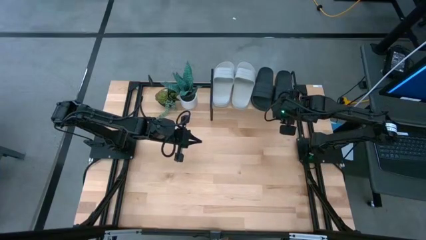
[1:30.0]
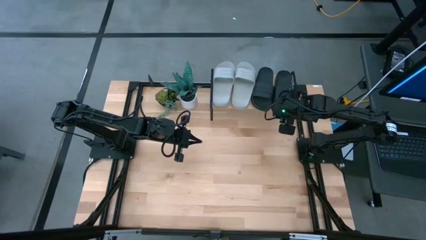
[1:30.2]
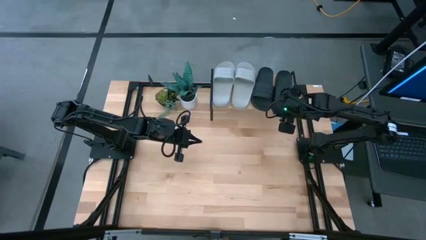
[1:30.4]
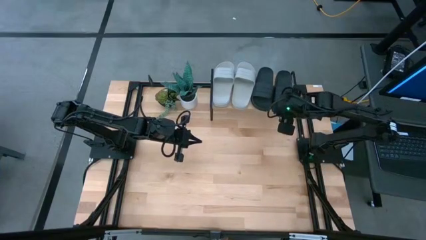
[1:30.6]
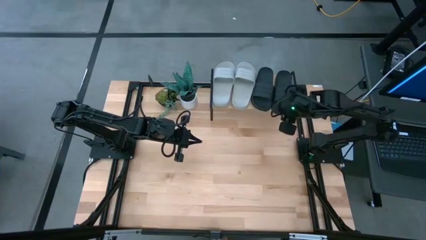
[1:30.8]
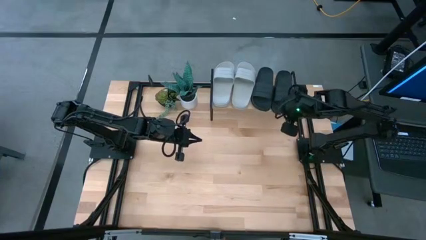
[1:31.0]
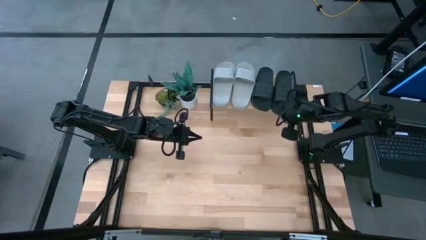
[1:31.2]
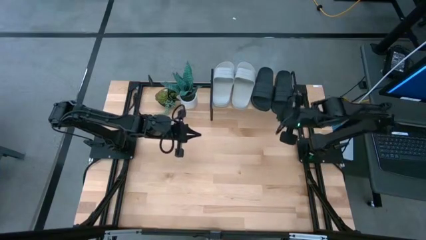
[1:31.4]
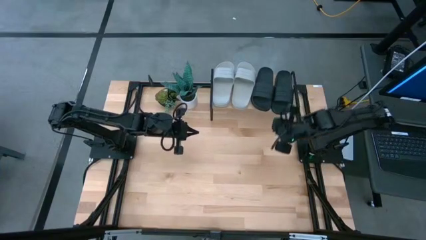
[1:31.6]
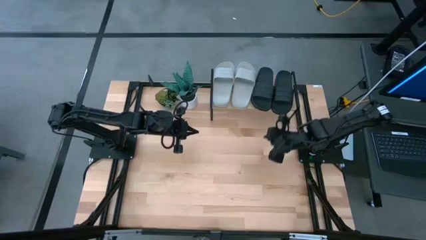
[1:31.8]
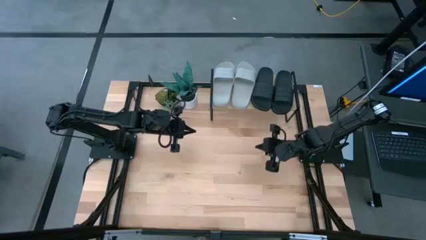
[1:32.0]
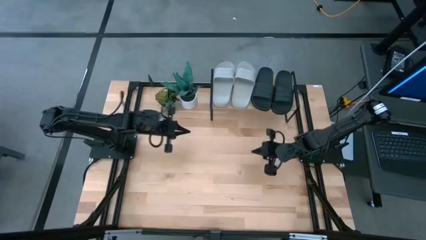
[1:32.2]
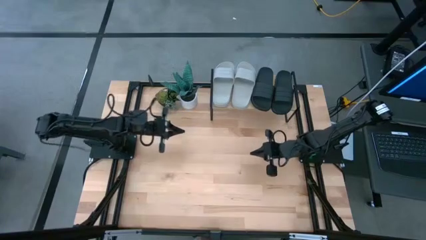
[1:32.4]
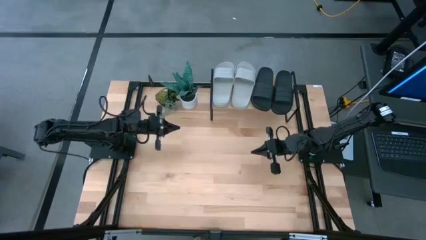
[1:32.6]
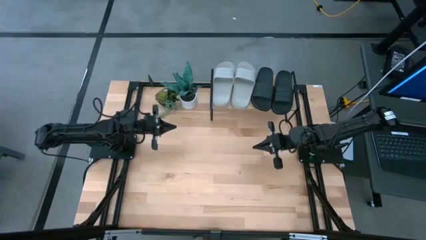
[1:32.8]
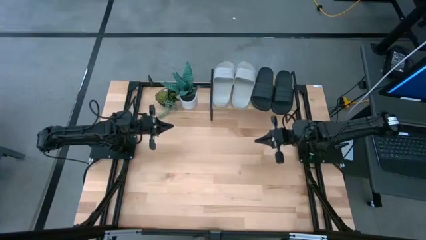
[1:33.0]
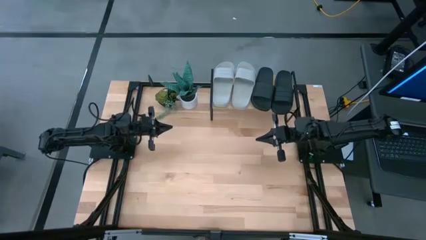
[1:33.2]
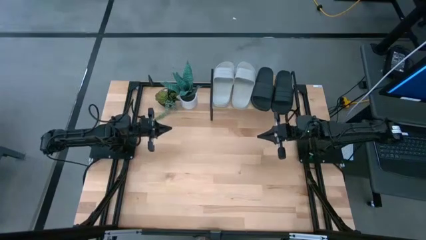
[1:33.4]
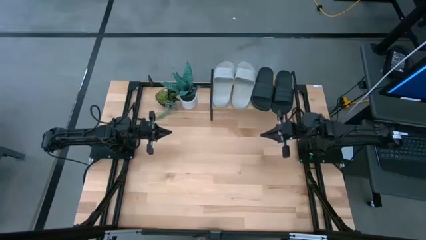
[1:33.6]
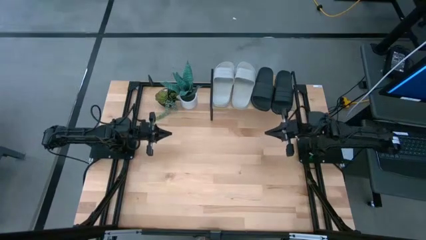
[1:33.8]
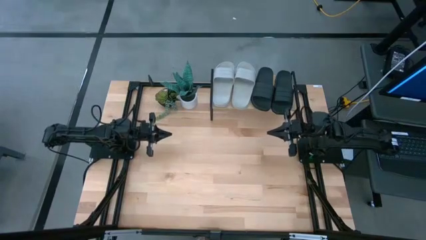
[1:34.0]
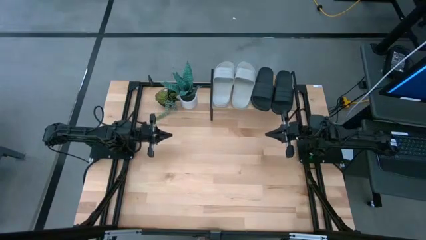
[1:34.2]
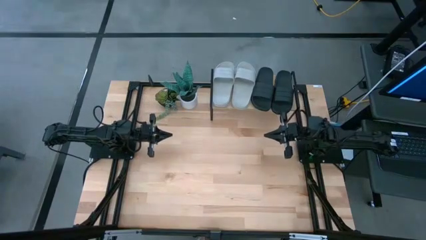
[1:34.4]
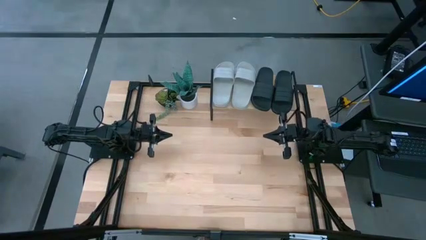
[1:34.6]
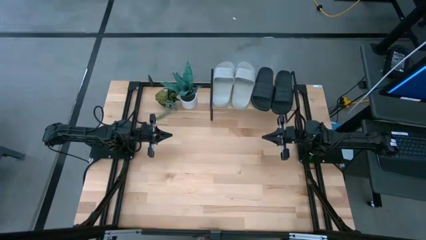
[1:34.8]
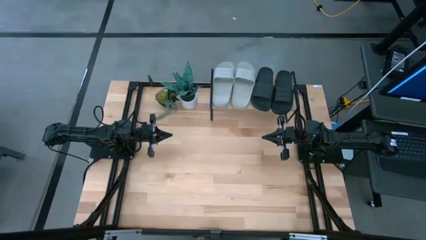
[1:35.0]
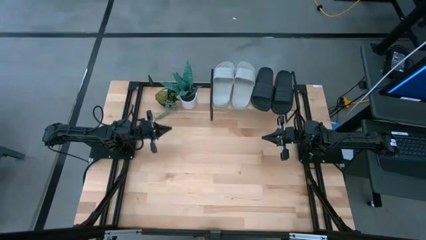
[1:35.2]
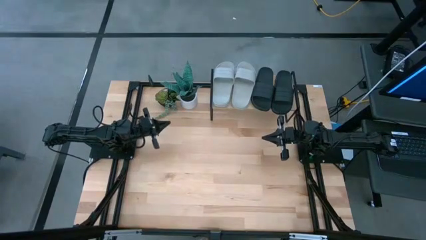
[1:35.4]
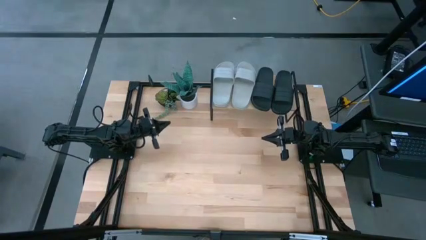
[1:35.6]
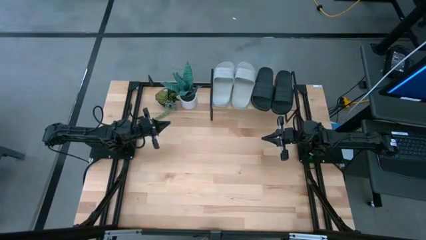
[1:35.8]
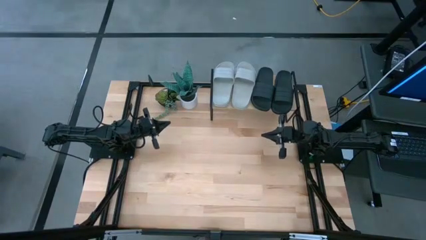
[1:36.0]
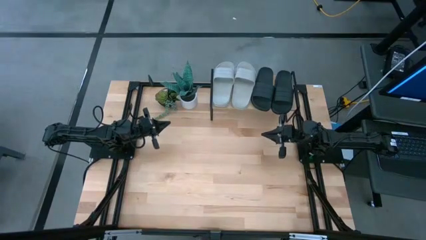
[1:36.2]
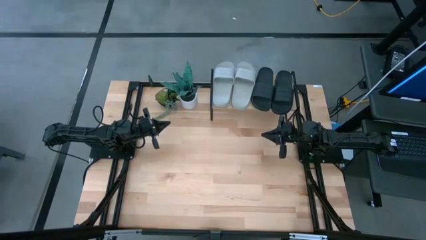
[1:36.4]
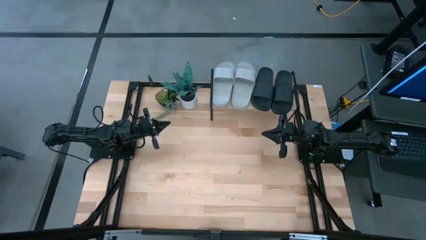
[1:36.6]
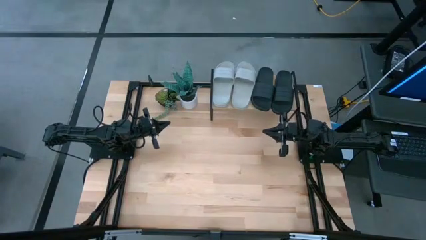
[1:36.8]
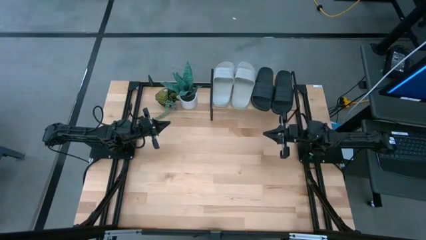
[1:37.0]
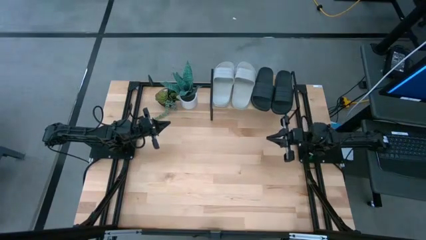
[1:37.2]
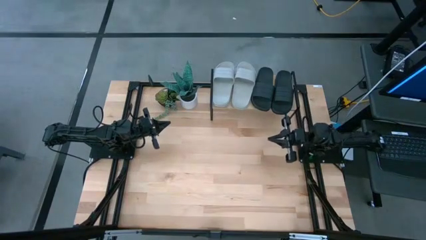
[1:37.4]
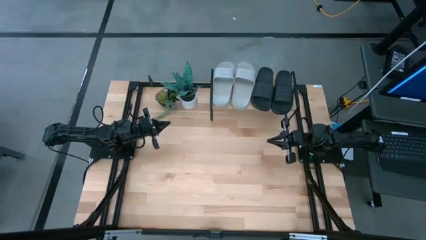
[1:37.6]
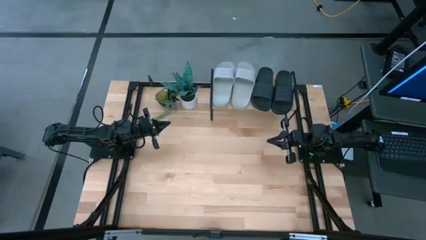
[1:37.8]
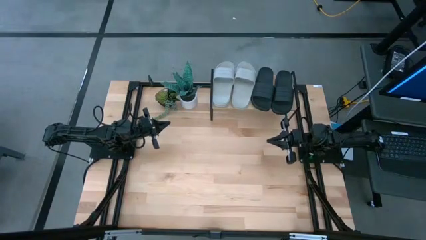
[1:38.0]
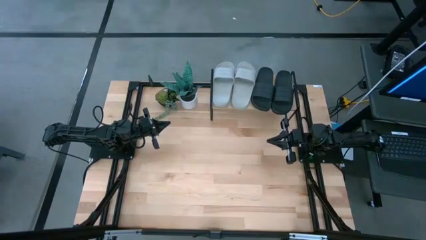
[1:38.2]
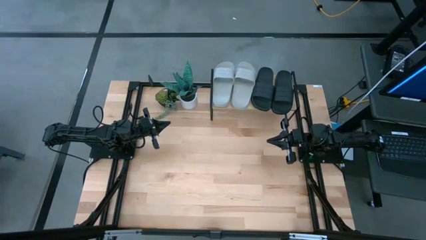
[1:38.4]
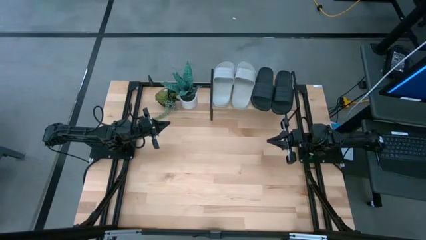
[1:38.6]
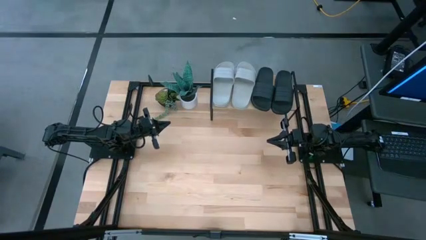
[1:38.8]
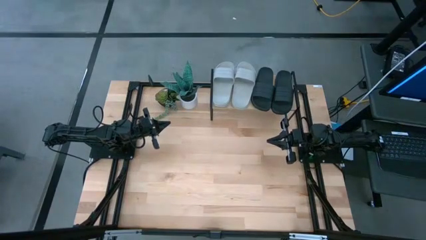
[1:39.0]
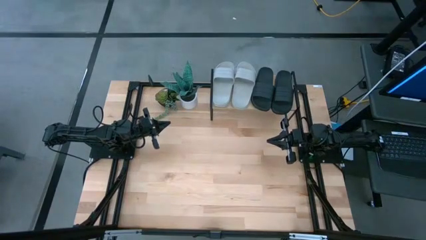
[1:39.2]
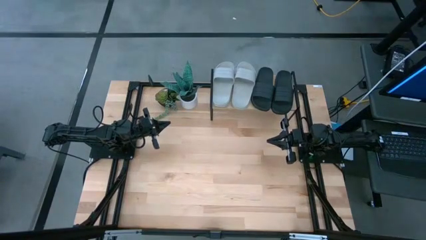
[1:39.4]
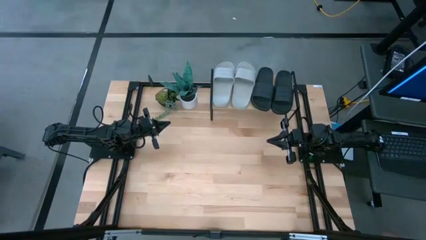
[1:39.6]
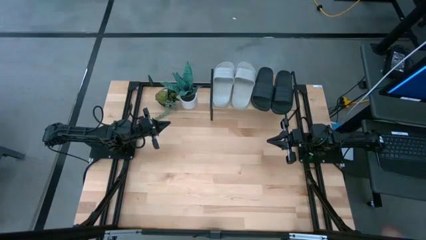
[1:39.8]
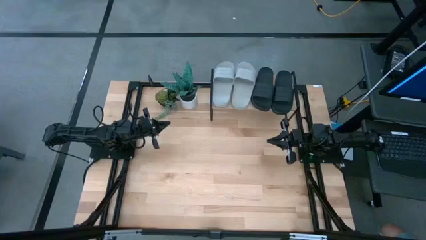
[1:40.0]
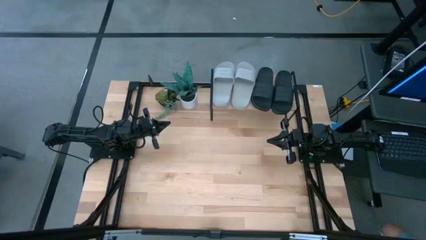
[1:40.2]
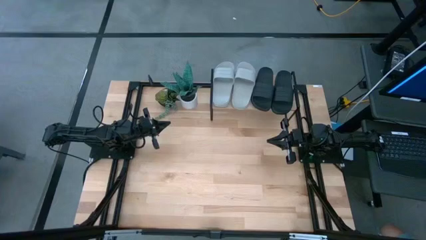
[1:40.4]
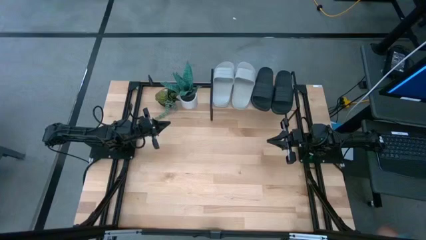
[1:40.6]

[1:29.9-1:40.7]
Task: Pick and place slides into the shelf
Return to Home Position

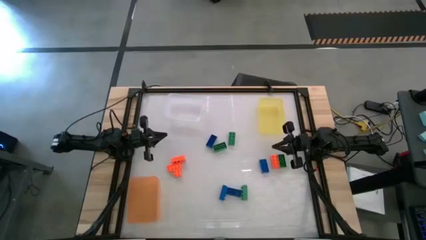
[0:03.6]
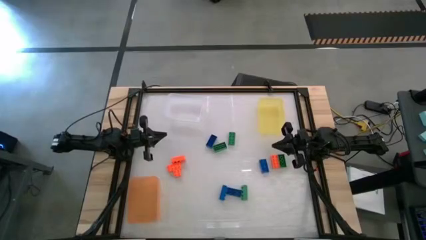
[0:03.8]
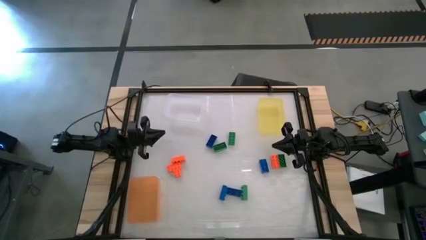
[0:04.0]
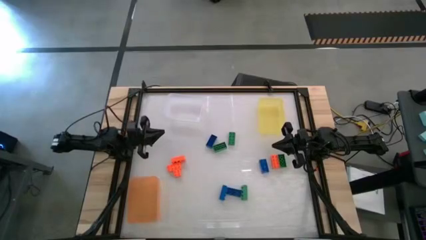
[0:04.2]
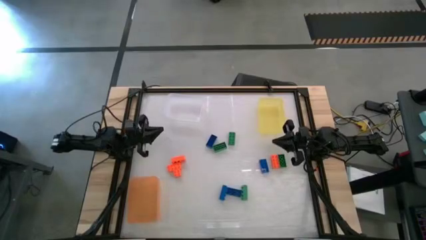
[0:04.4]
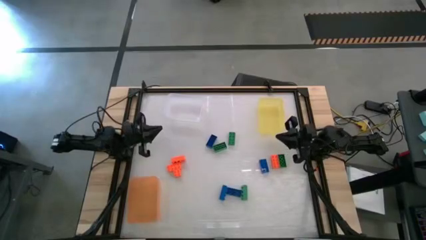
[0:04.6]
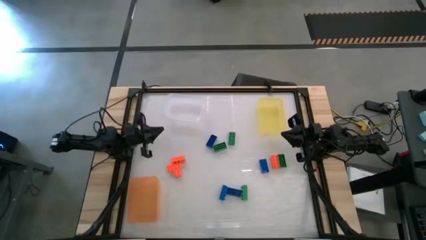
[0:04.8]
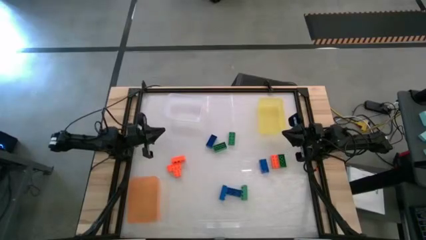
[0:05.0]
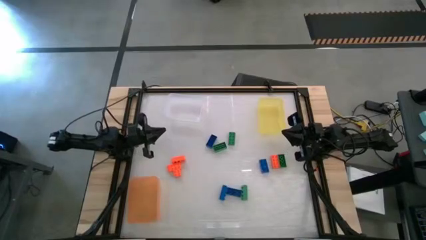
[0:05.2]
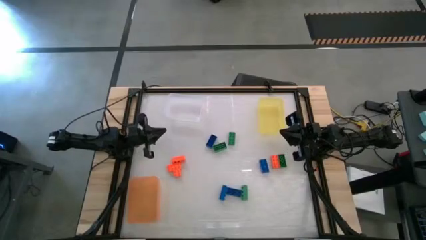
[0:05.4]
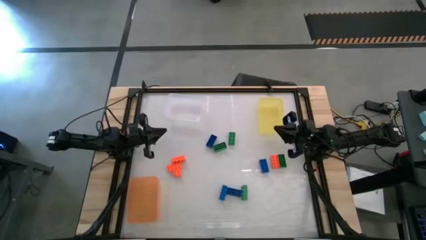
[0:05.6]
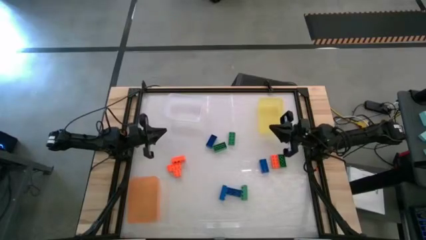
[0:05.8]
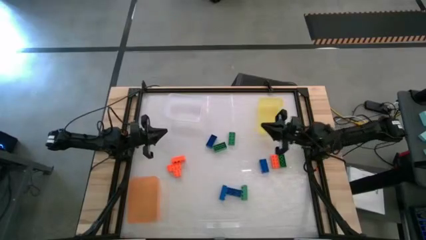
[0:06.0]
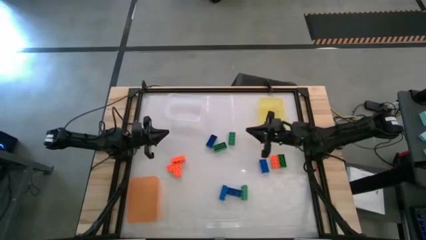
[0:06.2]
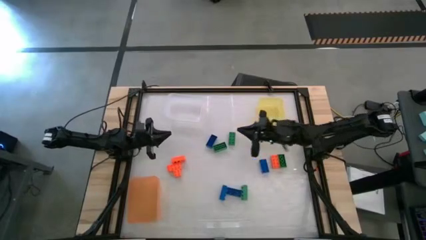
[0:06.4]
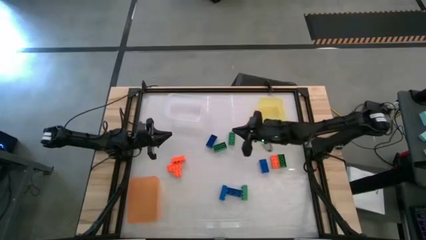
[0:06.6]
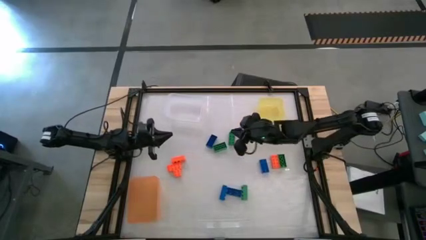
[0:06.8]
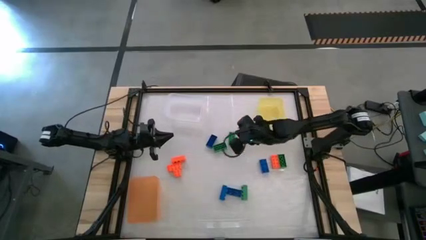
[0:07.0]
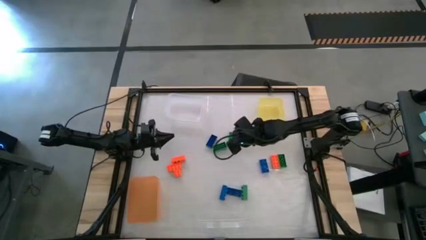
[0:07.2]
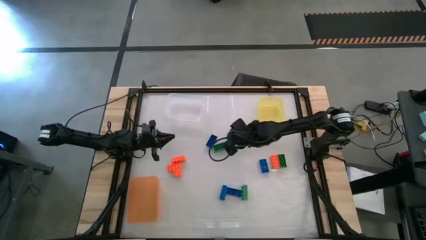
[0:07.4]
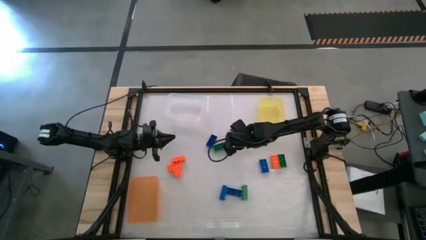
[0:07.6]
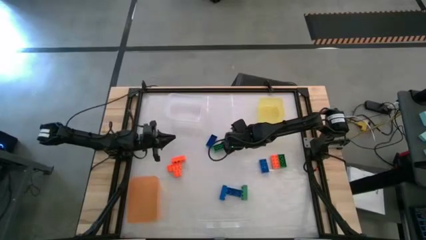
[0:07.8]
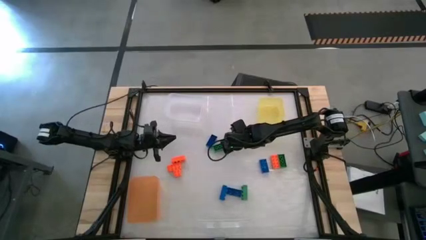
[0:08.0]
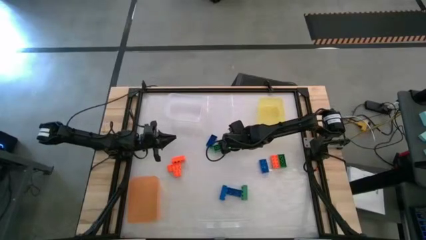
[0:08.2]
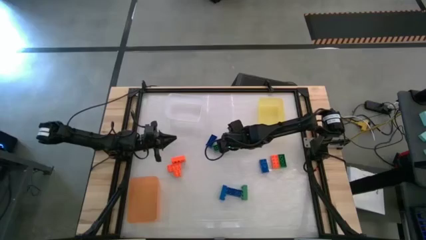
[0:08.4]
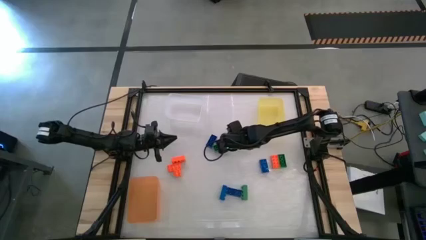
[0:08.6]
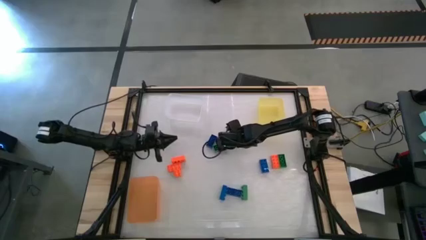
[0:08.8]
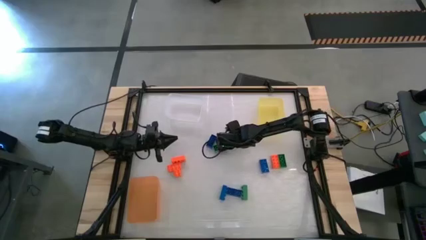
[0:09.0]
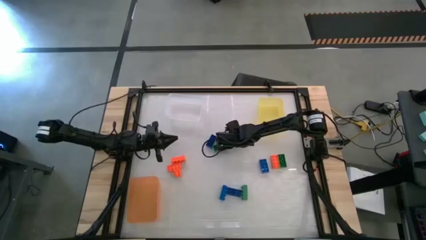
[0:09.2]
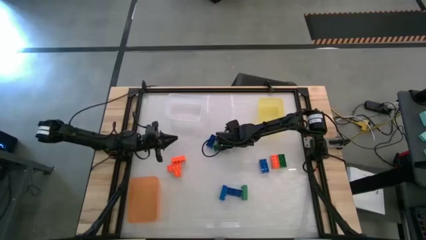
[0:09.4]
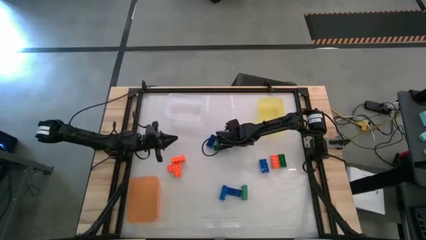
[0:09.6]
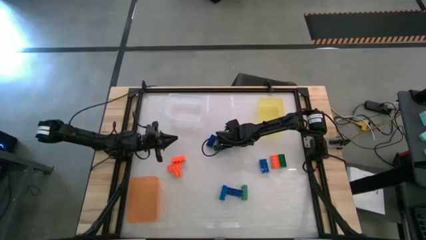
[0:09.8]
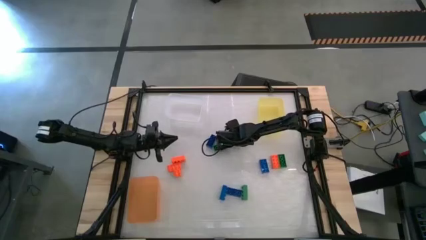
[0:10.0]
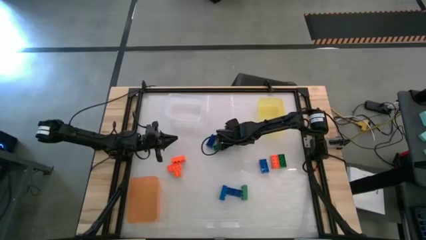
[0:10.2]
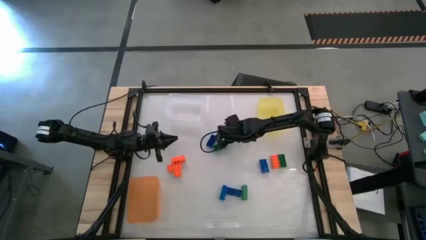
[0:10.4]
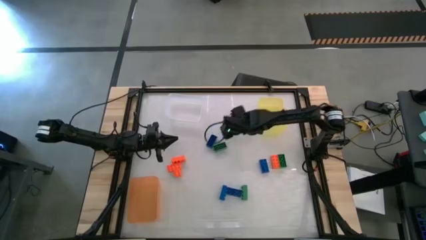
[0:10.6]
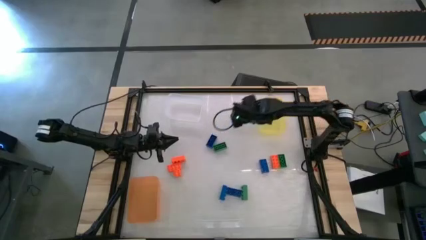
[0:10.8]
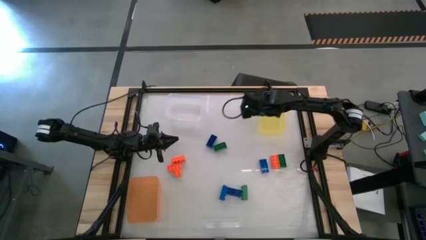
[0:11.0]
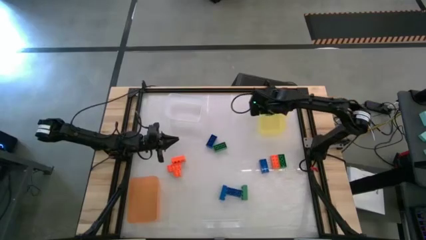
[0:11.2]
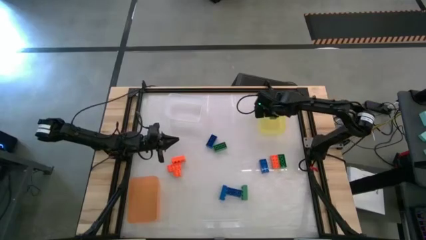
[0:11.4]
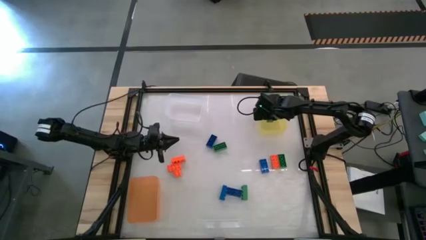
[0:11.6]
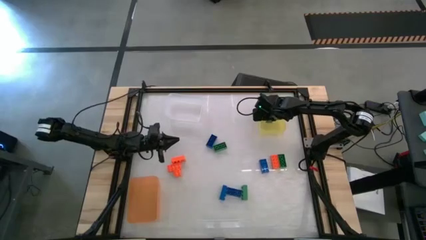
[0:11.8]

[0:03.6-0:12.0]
Task: Sort & place blocks by color
Put the green game piece into the yellow bin
